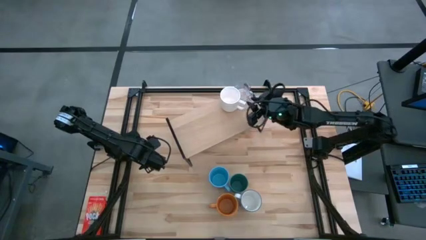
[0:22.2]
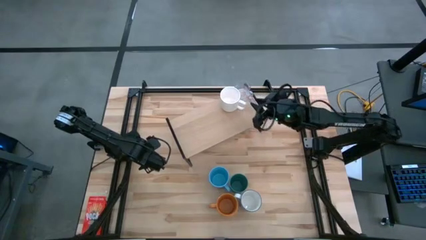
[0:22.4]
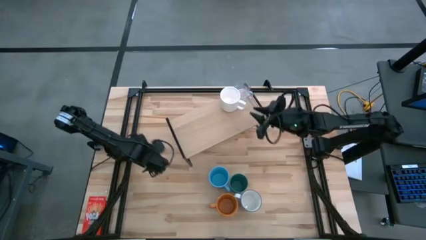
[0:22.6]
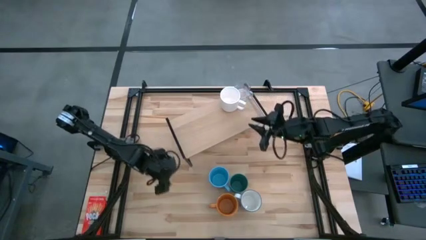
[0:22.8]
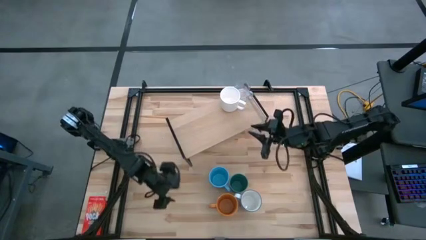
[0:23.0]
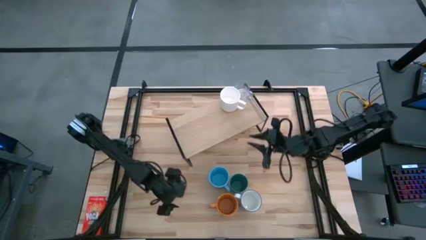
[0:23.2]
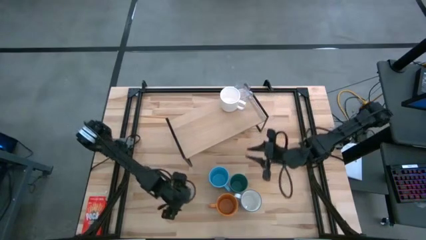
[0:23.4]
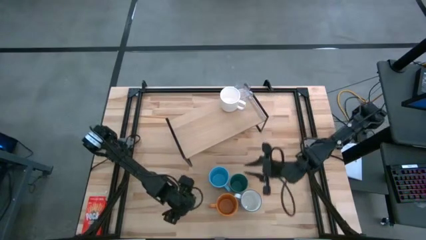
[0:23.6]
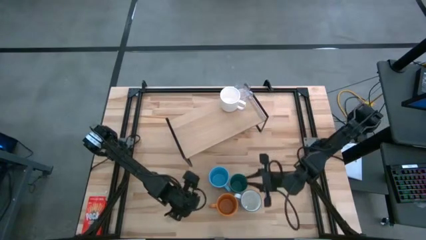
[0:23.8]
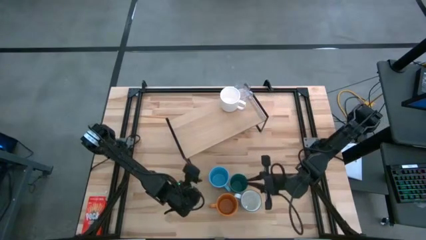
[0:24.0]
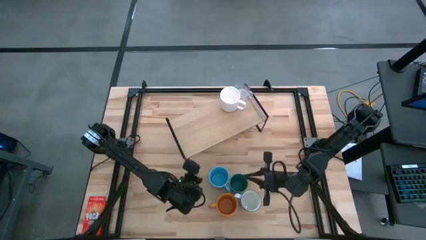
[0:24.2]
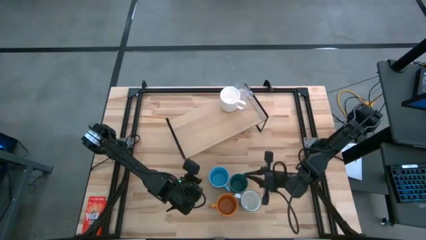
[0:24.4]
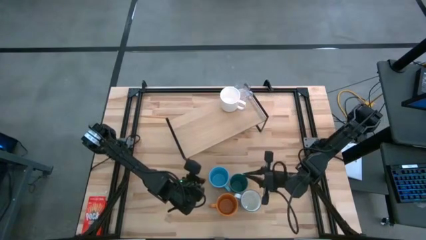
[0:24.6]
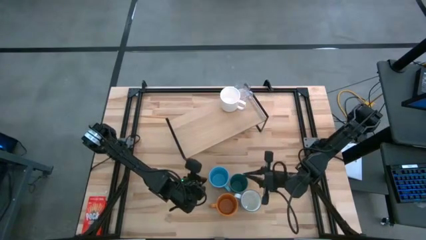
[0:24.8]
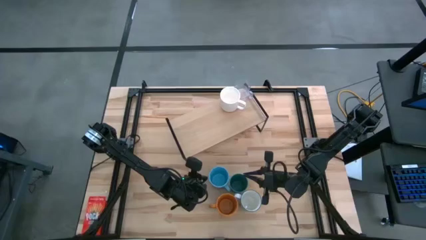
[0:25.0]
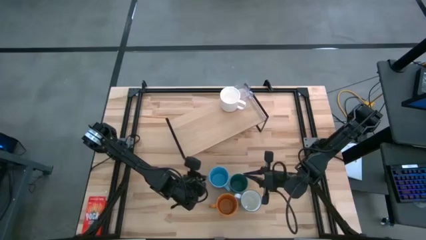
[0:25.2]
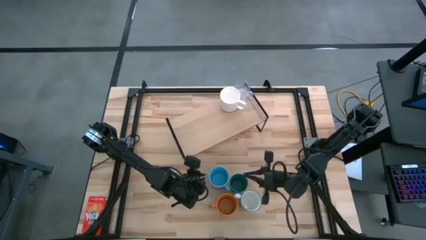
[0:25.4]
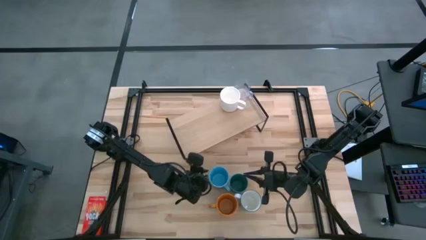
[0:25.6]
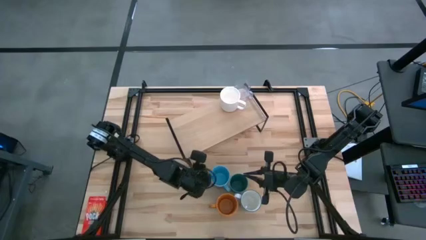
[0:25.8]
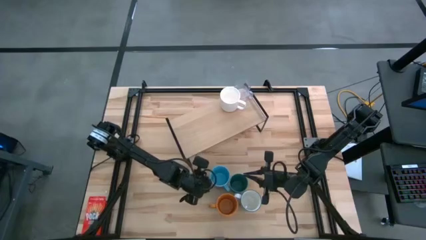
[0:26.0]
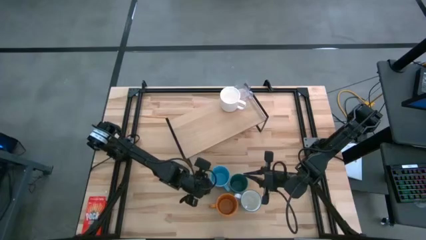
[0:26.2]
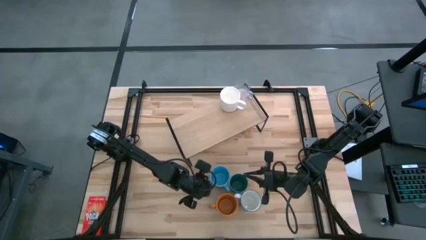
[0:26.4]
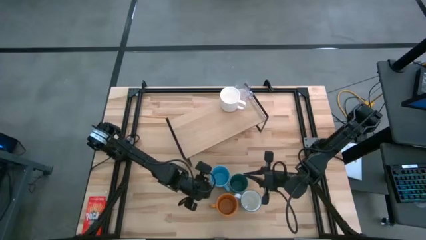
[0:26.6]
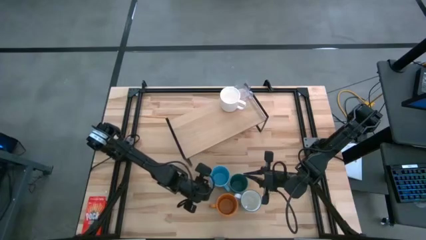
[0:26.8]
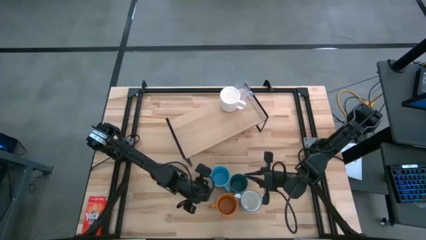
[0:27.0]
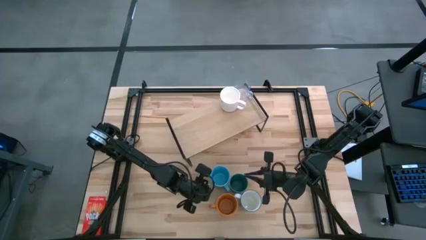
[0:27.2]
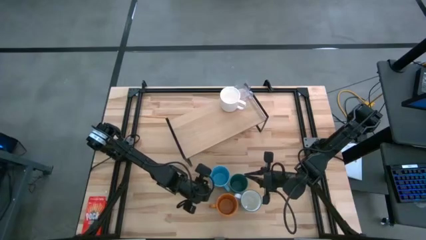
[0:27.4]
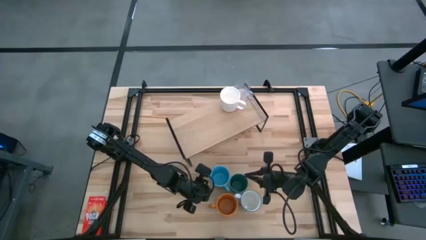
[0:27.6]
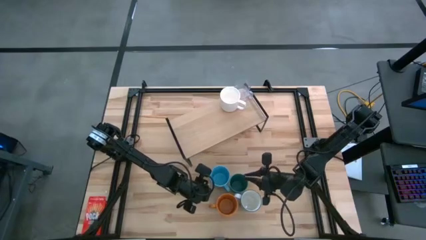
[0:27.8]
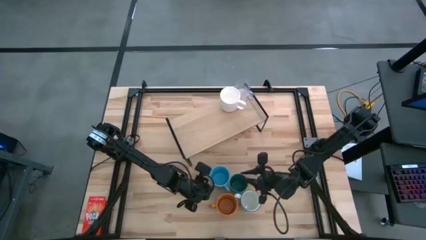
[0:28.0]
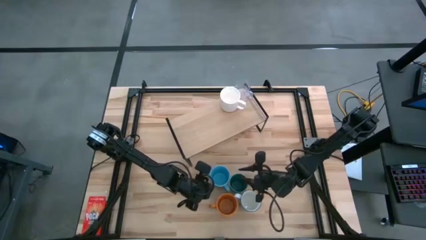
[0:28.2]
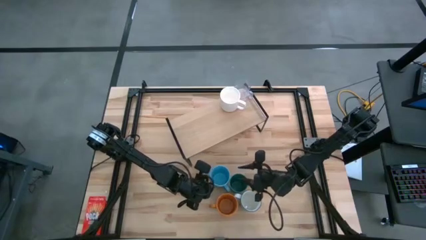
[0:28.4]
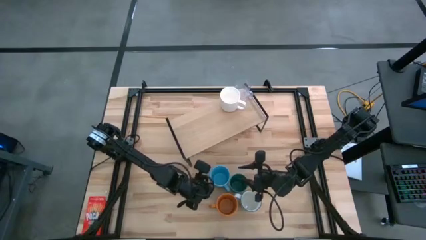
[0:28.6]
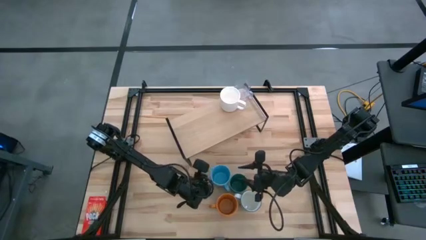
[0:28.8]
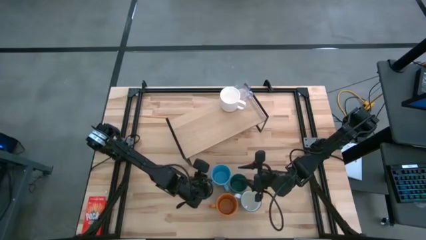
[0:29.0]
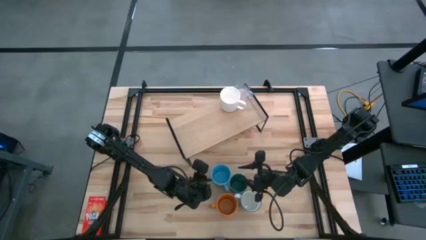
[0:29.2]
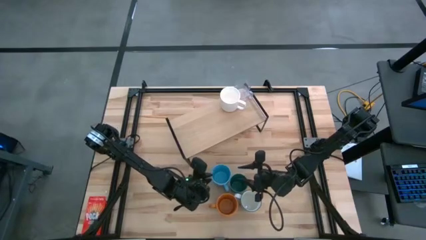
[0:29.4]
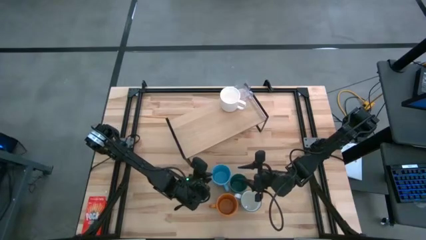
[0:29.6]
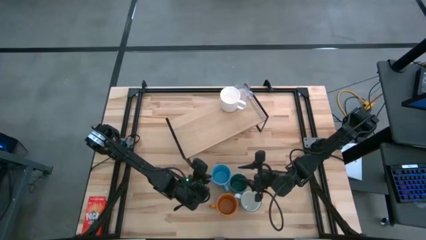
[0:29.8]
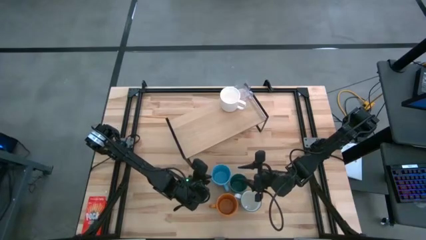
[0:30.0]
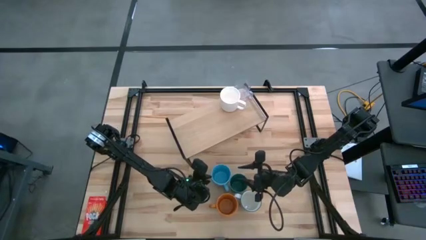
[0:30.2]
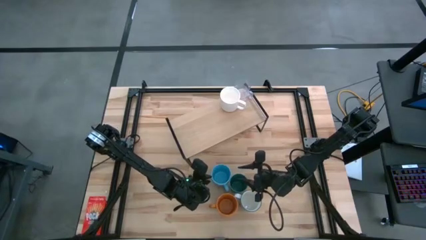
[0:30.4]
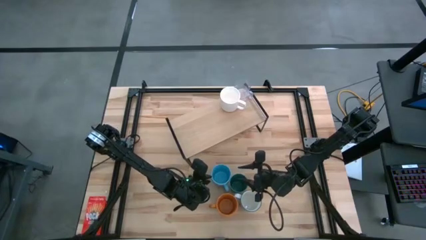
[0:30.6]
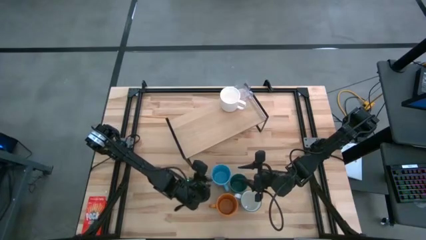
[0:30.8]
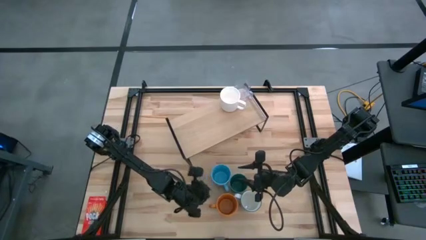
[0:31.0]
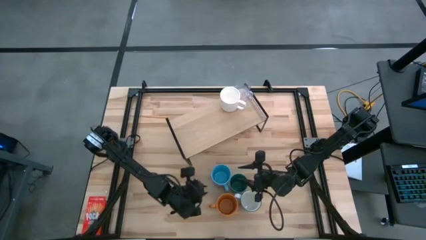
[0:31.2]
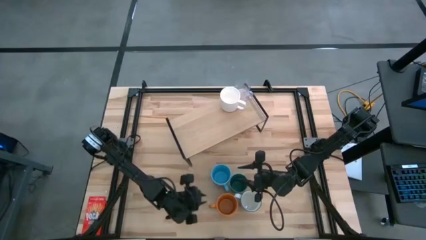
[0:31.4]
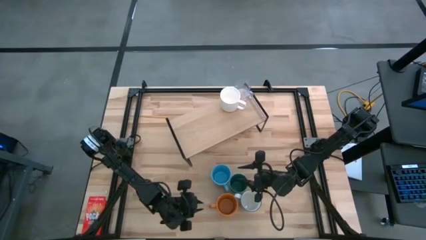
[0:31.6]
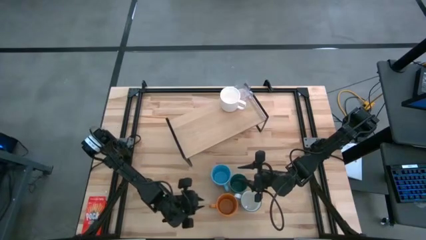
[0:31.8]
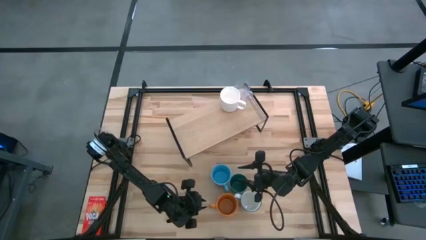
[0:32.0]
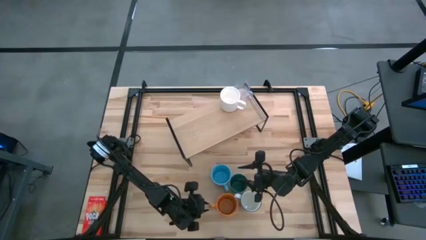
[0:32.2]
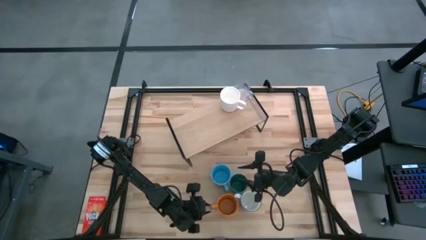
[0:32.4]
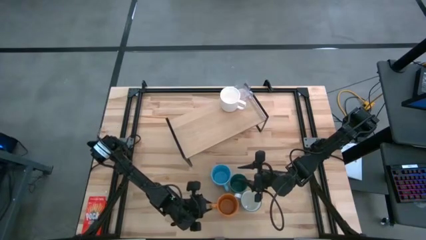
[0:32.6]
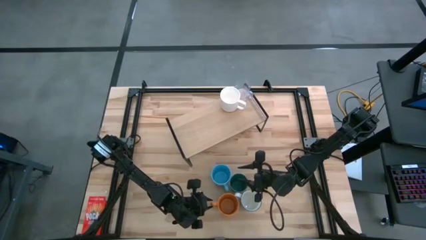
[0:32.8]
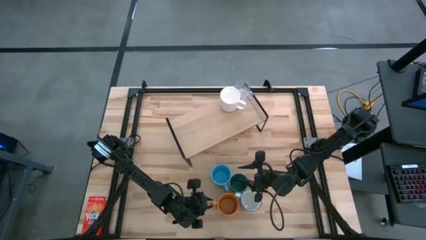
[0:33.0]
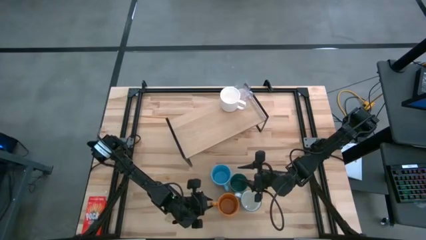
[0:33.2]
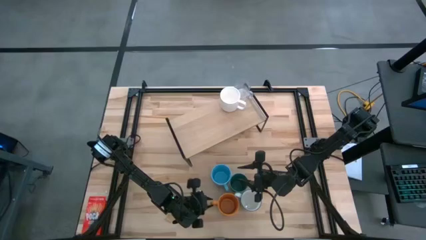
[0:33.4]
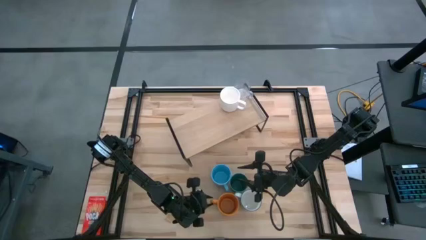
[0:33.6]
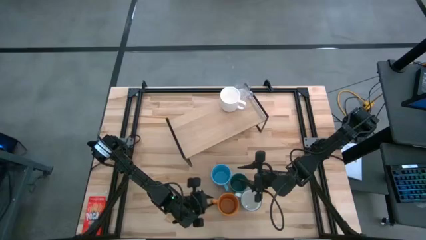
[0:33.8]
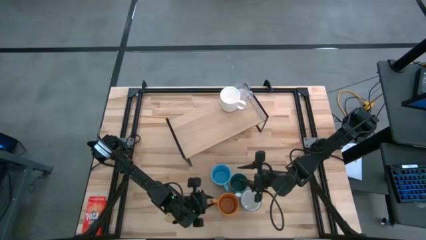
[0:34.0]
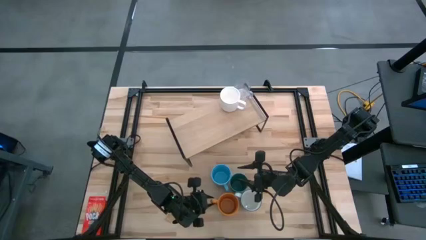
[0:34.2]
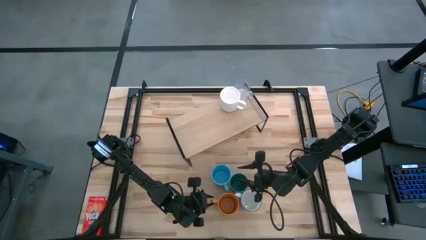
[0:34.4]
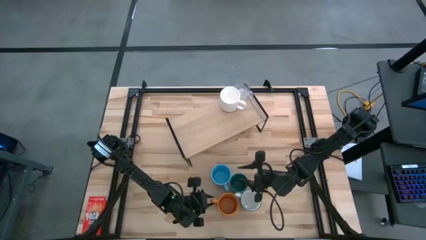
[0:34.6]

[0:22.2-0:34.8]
Task: Stack small to large cups/mugs on shelf
Put the orange mug on the shelf

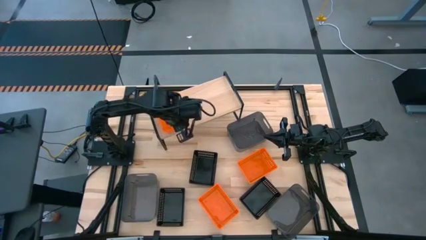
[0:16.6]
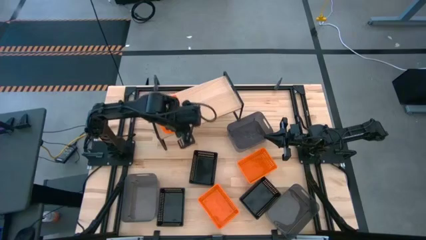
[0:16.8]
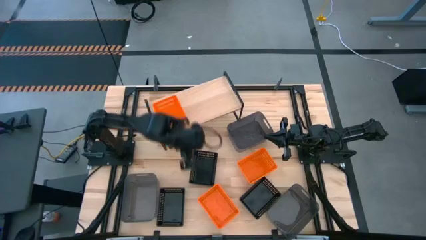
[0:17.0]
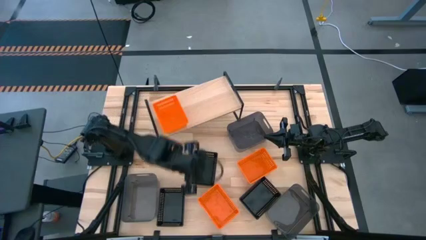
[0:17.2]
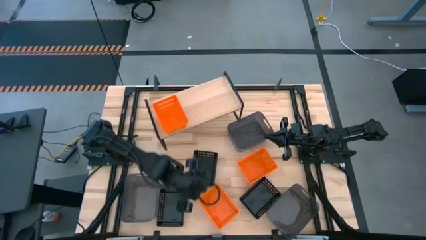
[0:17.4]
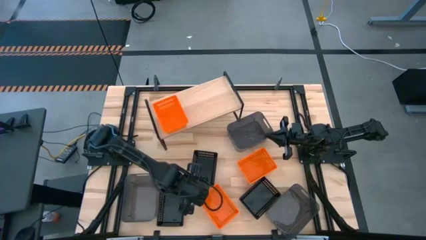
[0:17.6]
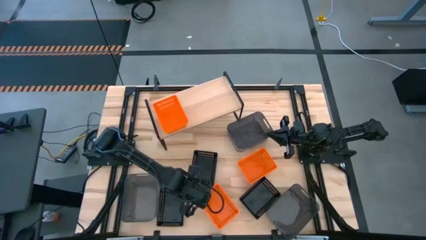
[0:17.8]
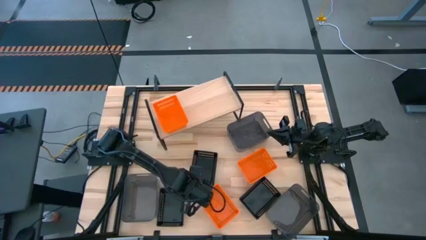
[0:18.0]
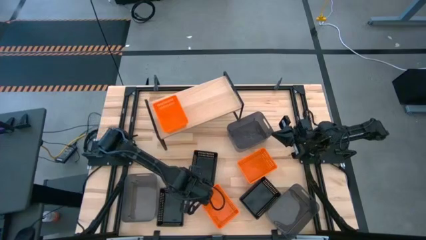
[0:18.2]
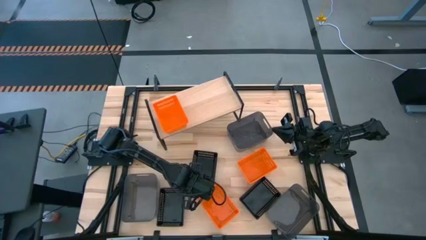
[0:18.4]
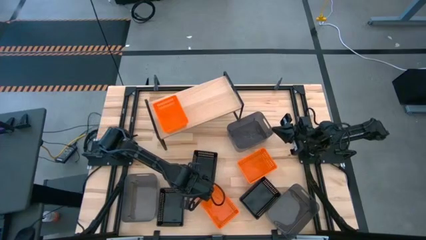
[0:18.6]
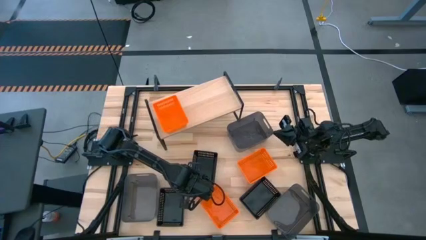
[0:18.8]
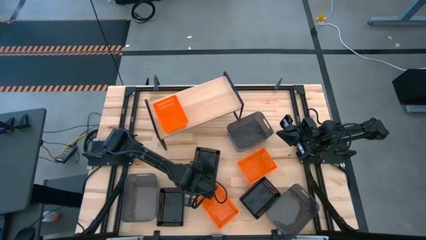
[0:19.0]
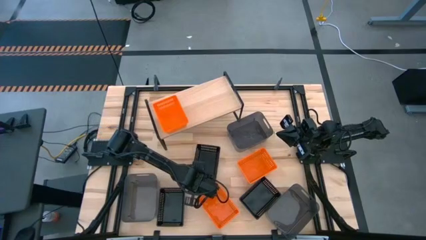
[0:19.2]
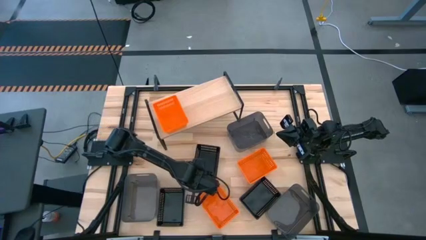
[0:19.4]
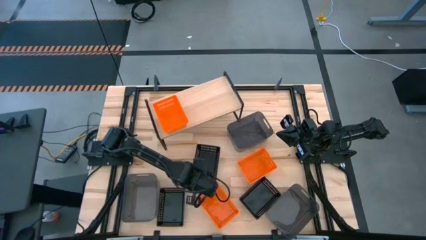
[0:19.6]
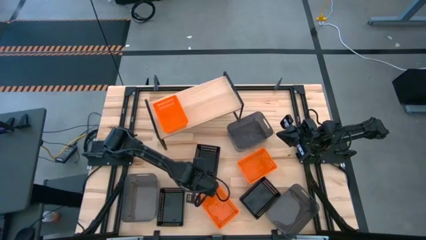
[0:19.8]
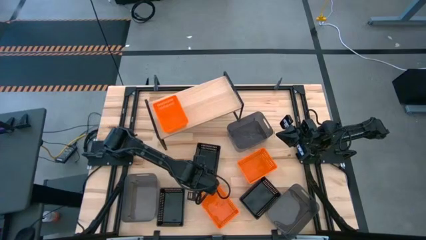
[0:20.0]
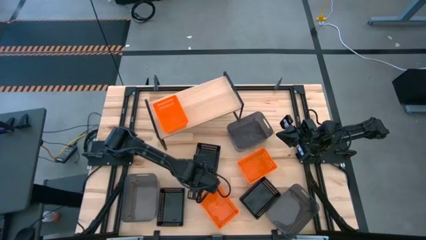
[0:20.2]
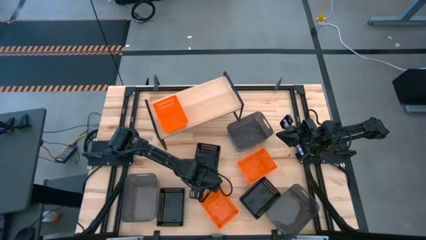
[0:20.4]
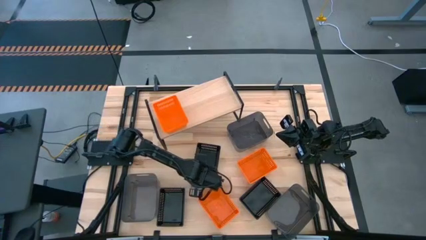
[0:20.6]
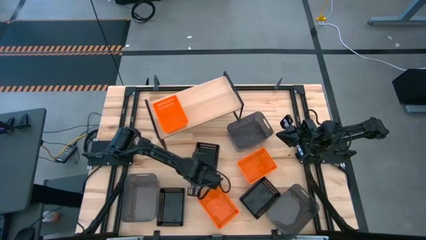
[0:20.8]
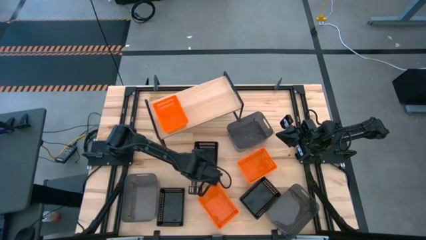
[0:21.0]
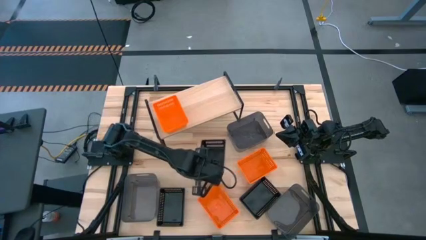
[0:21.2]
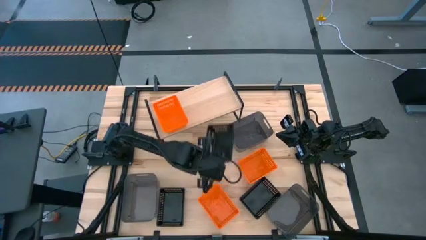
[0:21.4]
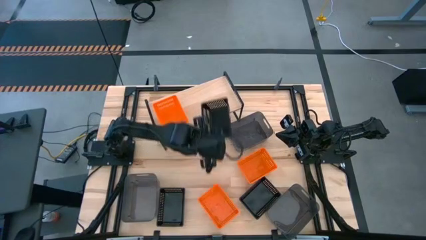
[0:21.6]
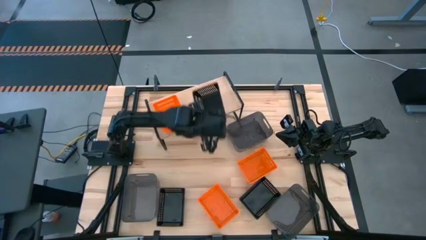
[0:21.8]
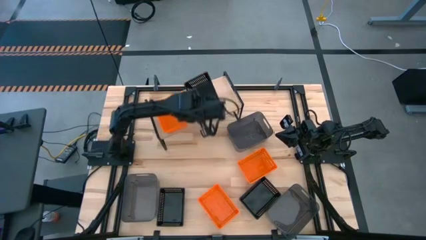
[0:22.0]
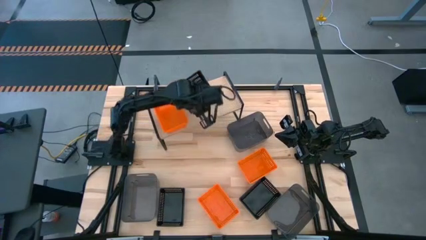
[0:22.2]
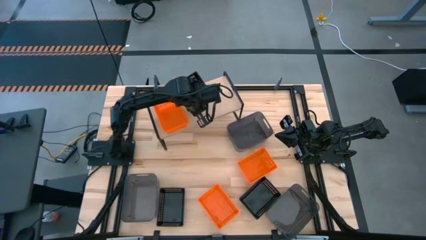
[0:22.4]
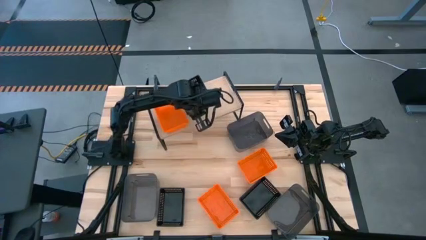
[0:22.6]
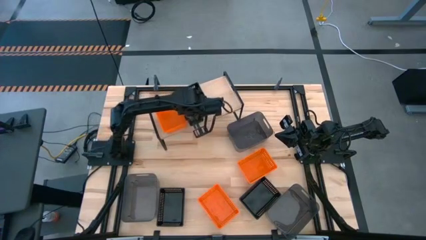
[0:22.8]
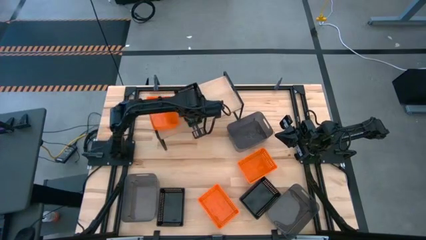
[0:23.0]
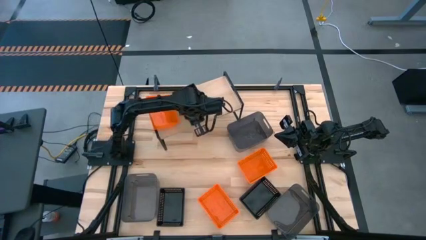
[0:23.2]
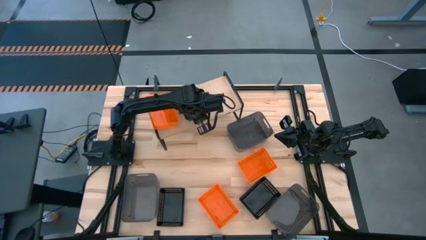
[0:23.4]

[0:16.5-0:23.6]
Task: Stack baskets on shelf by color
Put the top black bin on the shelf
